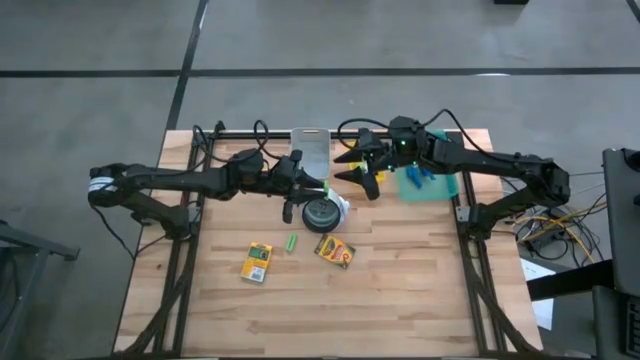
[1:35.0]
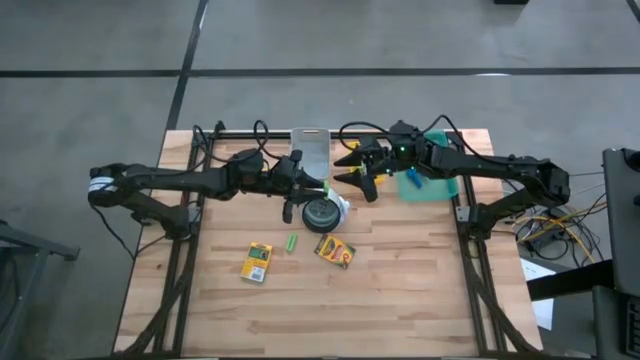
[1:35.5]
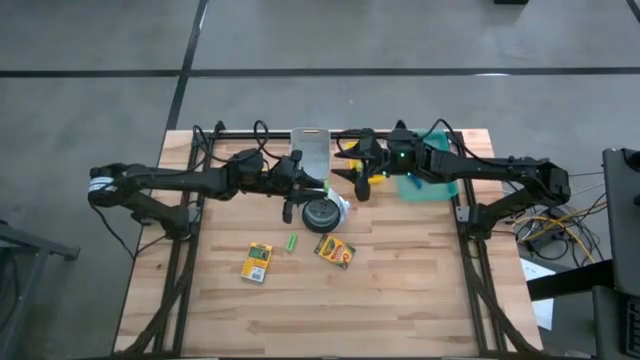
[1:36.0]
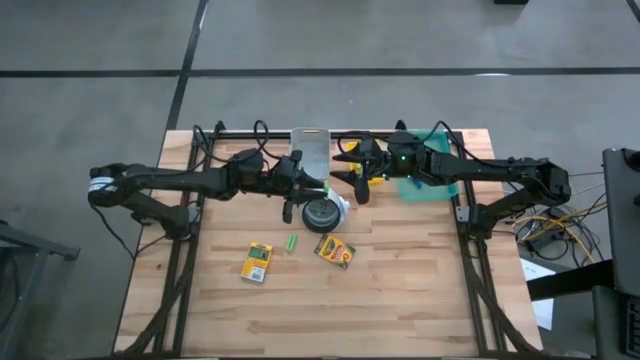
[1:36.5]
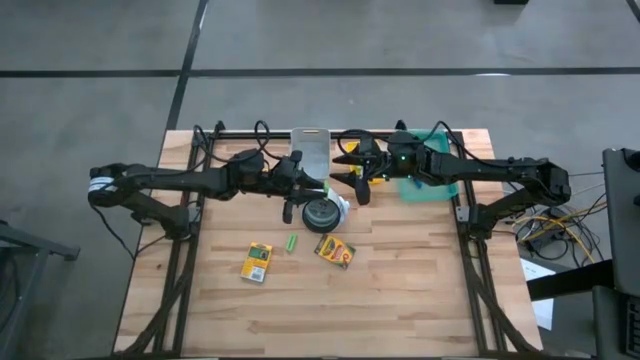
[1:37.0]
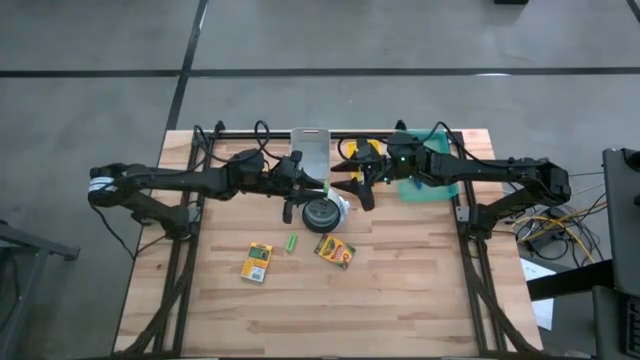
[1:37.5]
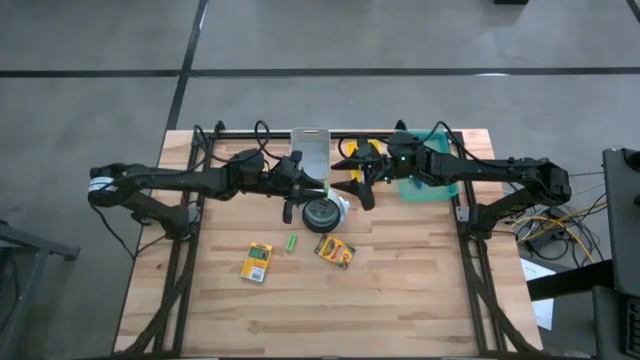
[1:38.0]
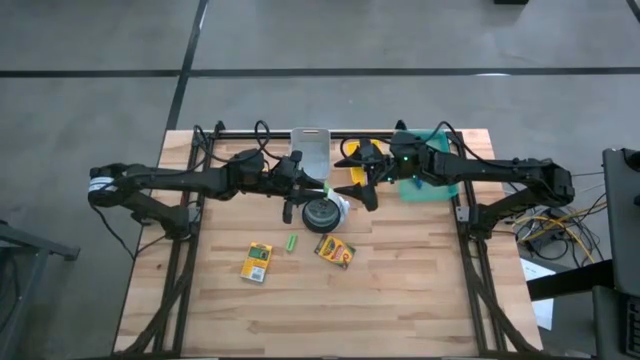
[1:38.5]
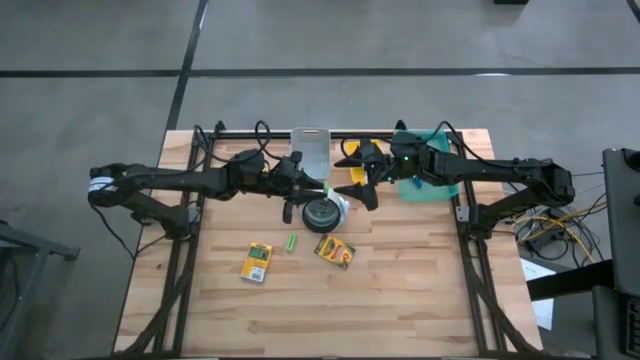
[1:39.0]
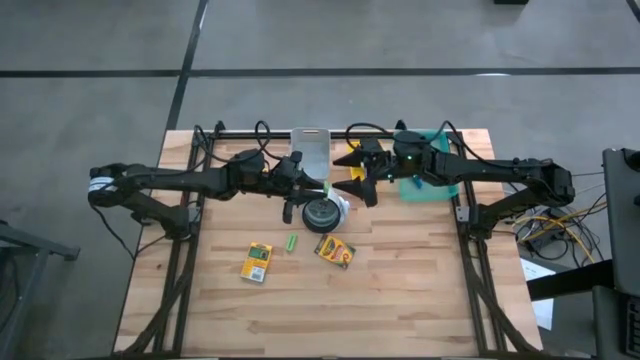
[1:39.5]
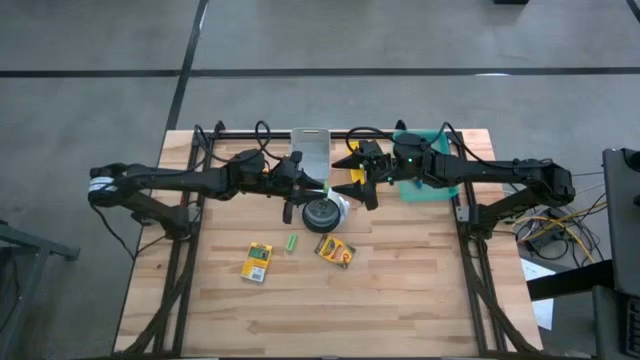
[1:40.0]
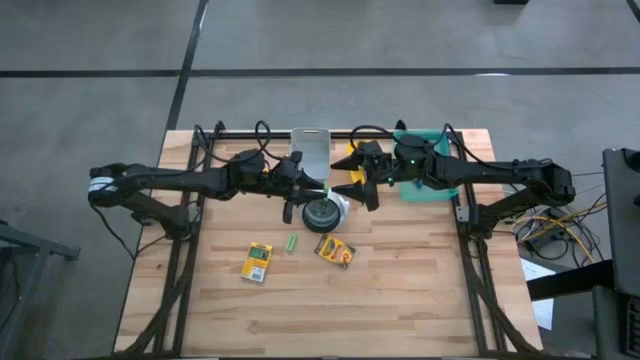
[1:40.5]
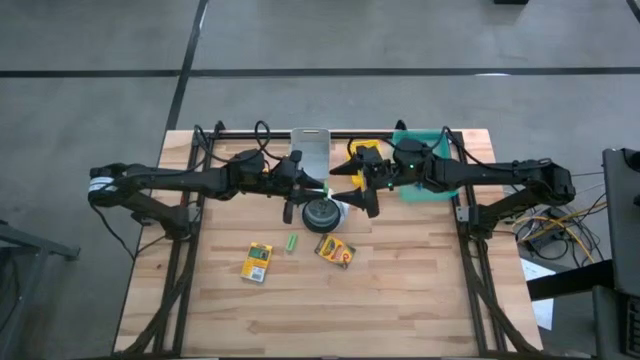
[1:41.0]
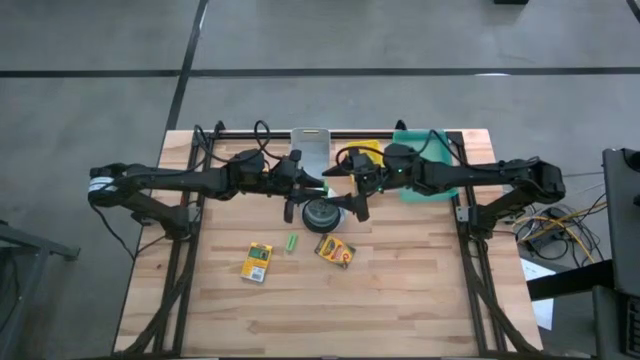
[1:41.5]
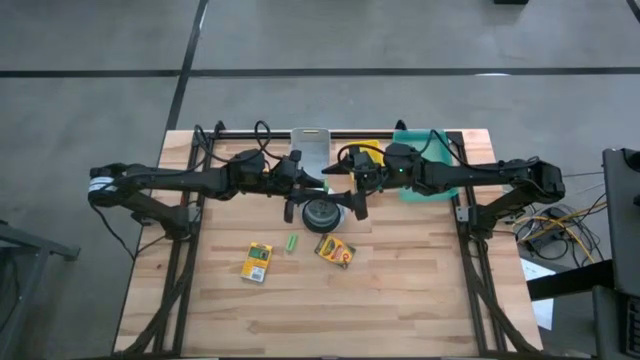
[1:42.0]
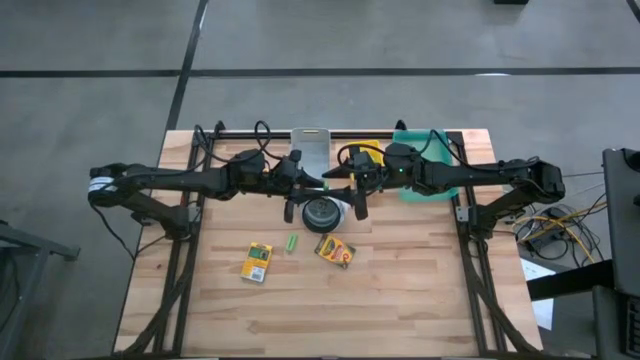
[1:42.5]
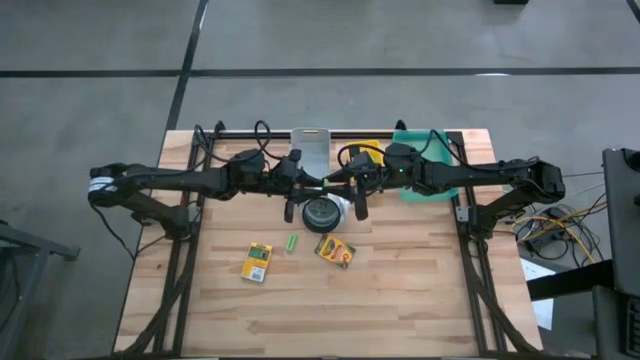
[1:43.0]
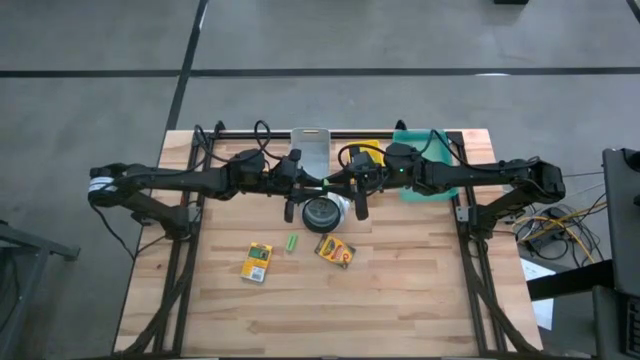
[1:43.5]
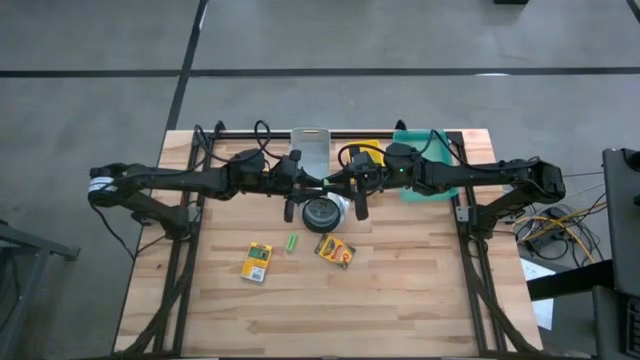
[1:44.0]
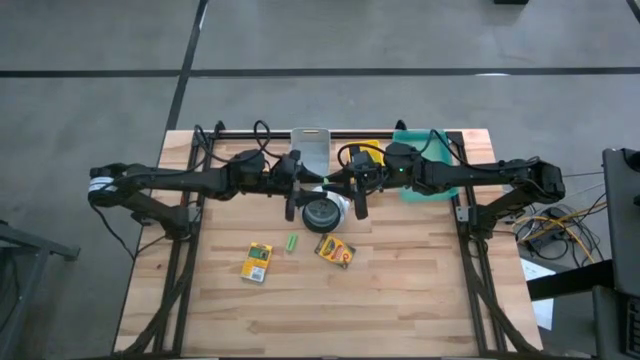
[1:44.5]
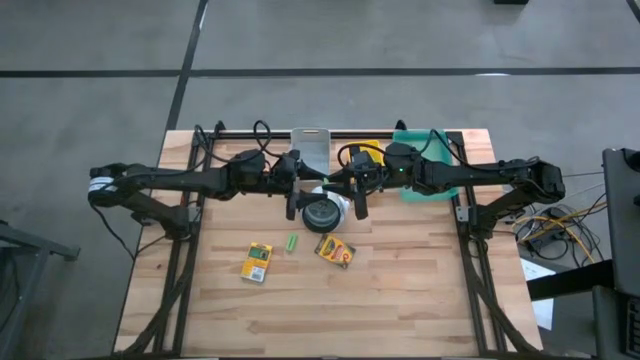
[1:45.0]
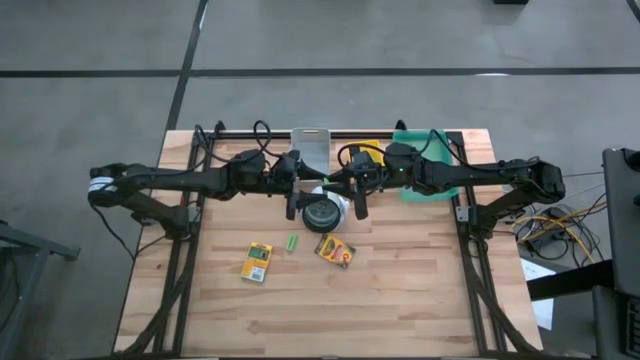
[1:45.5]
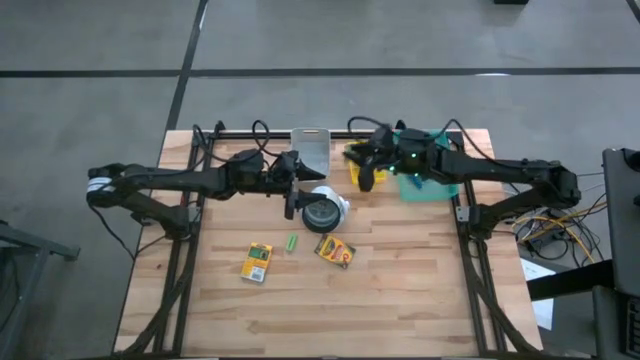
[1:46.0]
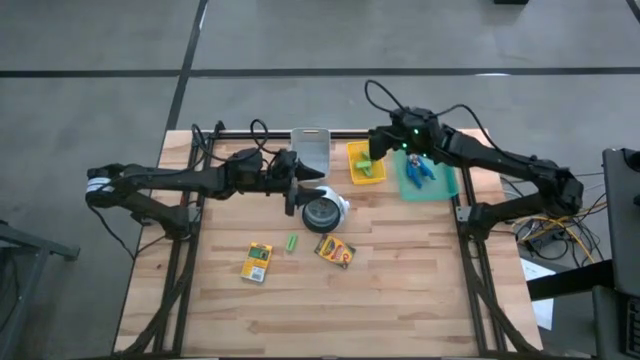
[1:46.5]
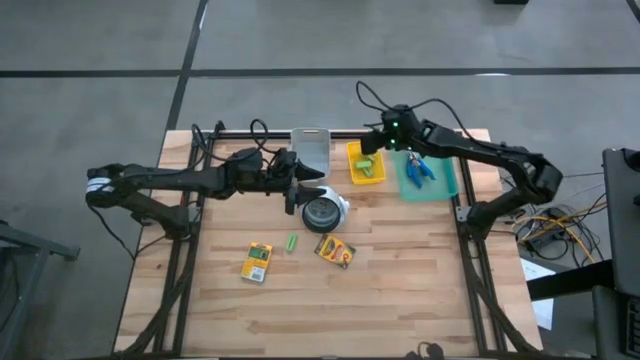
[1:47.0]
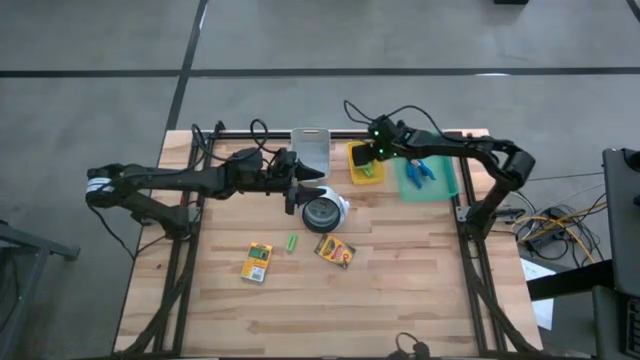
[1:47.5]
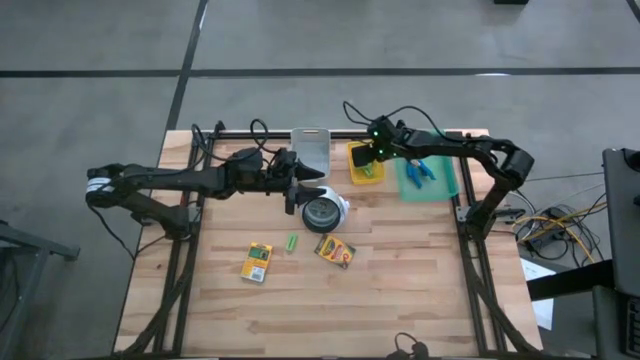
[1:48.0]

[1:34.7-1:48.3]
Task: Pick & Place School Supplies
Put the green eraser into the yellow bin

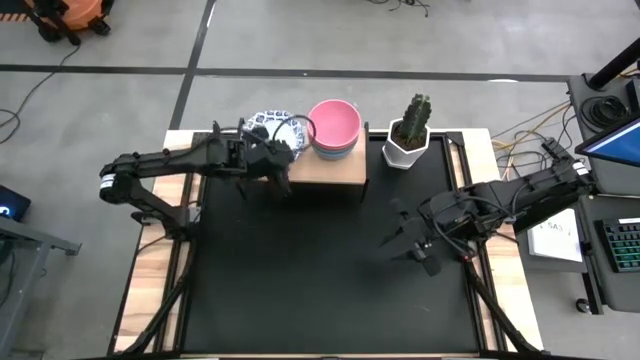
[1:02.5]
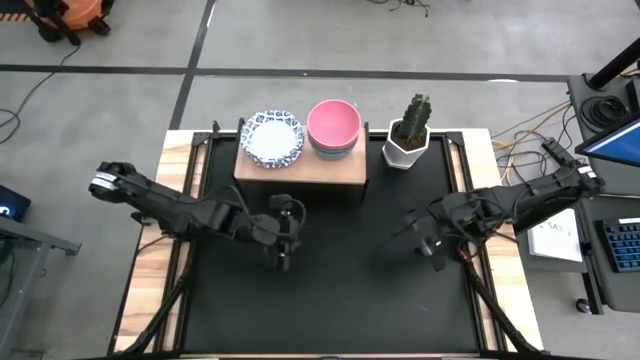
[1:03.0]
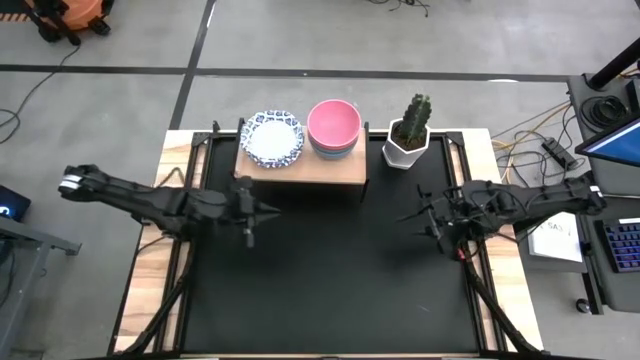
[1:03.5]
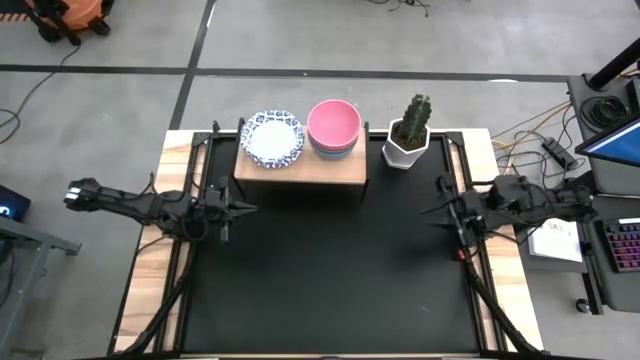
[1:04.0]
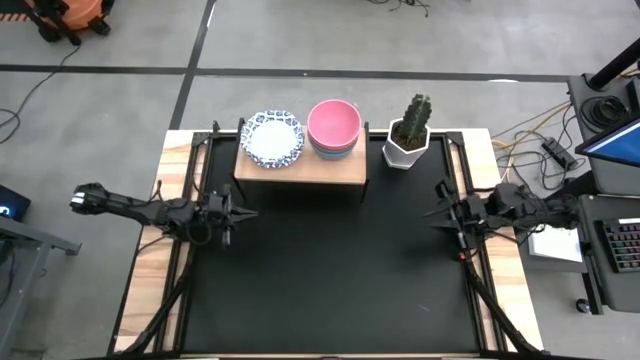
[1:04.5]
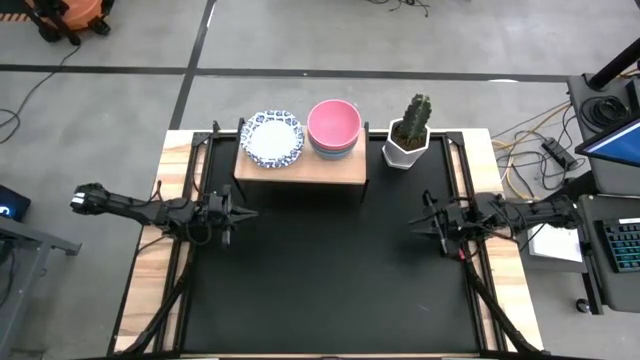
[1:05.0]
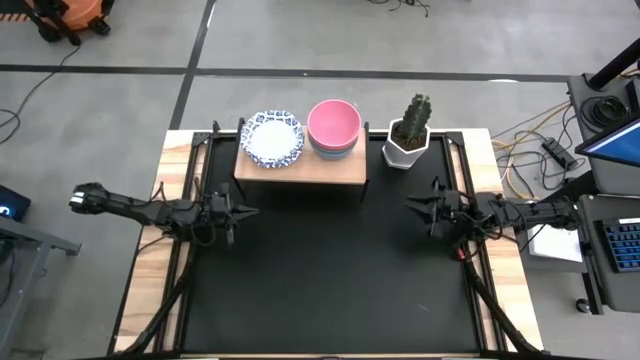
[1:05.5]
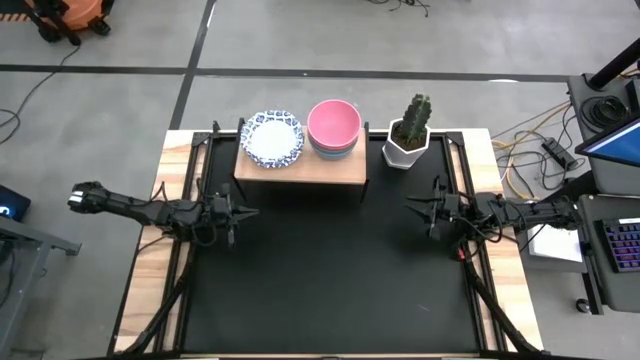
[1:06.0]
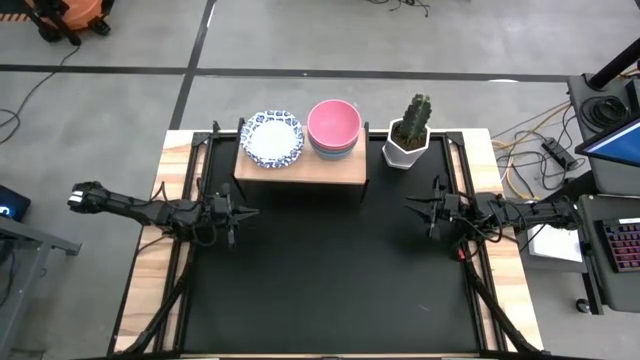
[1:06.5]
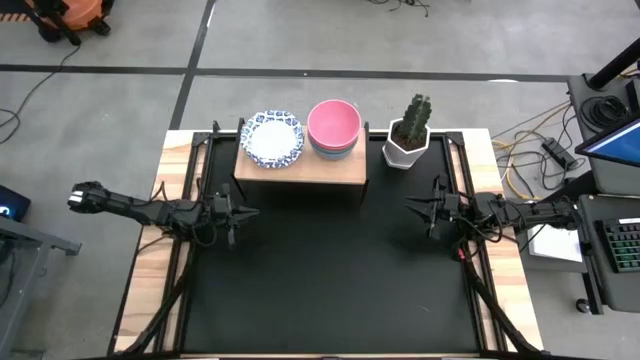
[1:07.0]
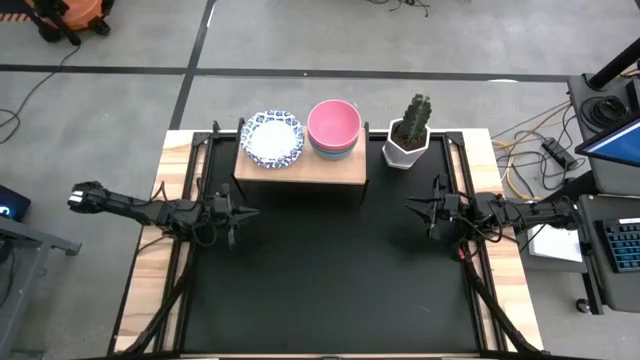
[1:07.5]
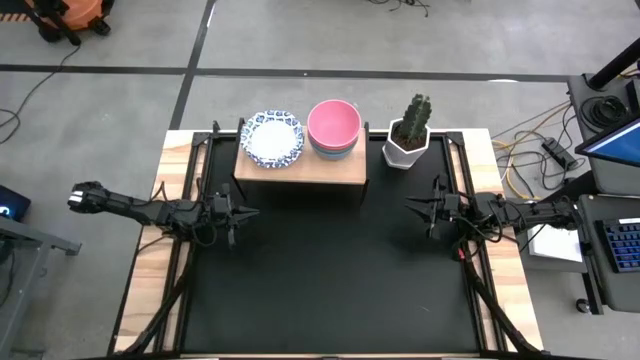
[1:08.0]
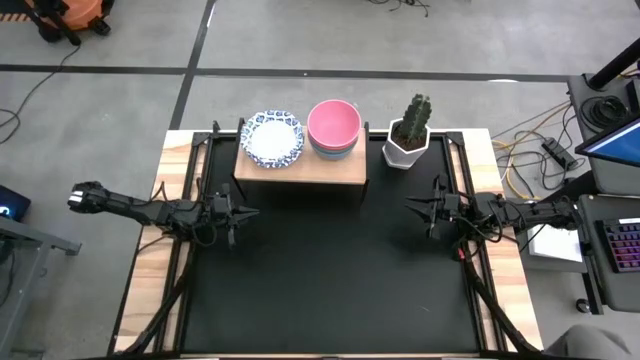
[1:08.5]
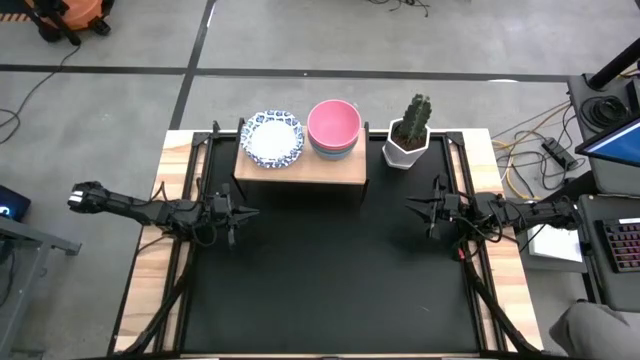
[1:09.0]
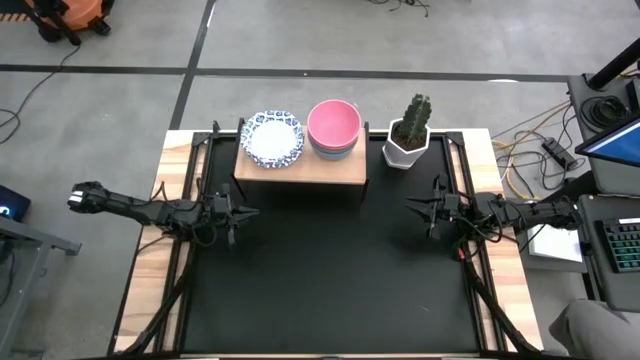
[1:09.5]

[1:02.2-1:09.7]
Task: Place and stack bowls onto a shelf
Return to Home Position
